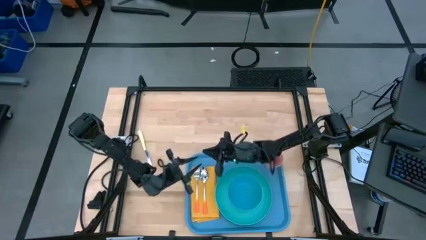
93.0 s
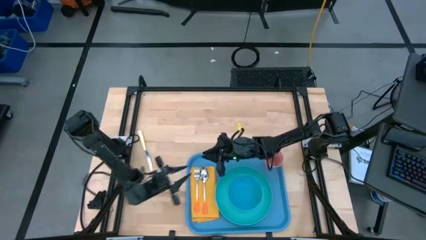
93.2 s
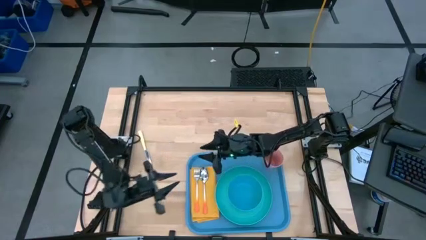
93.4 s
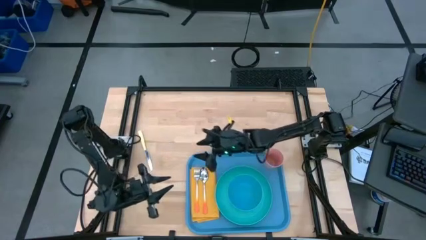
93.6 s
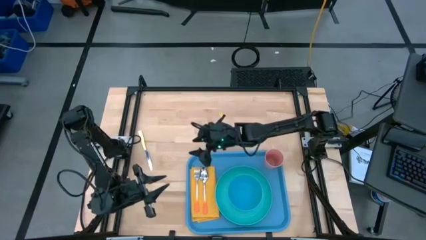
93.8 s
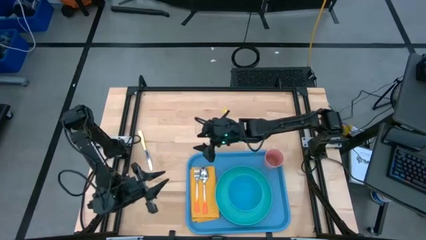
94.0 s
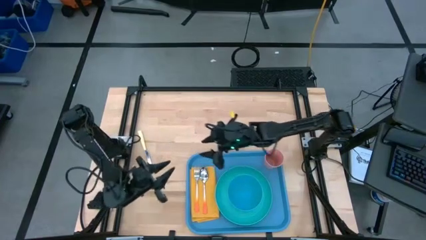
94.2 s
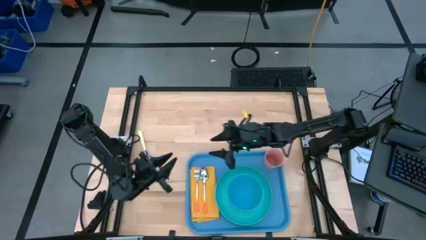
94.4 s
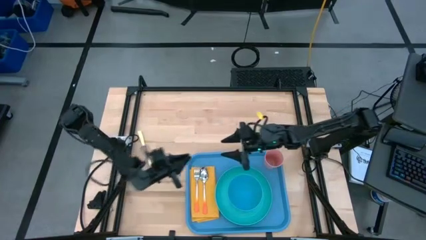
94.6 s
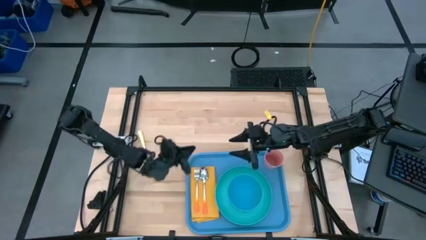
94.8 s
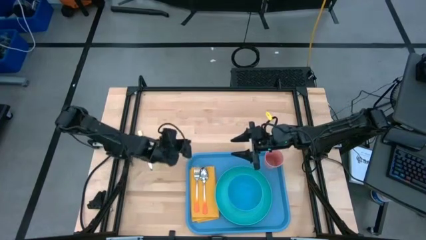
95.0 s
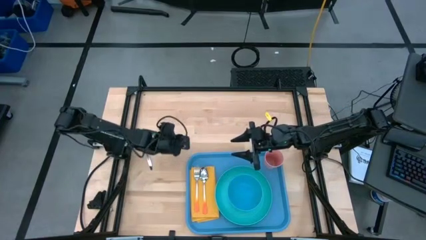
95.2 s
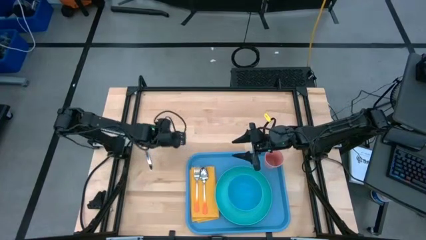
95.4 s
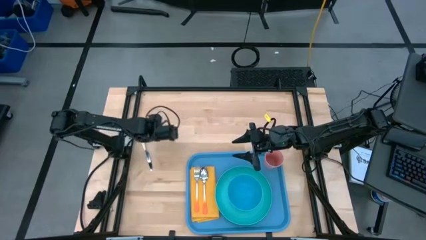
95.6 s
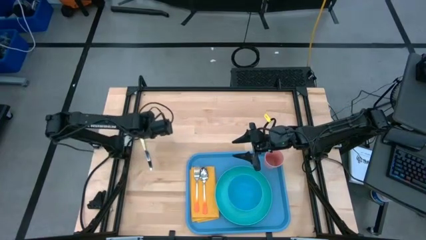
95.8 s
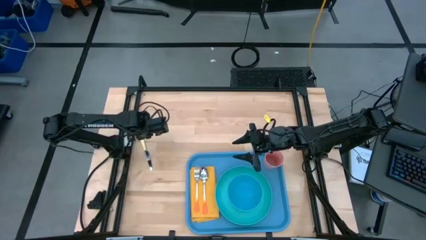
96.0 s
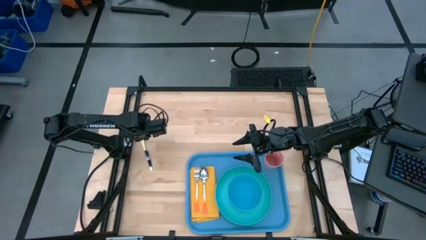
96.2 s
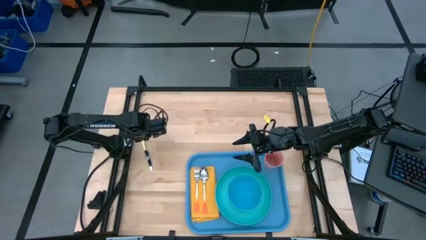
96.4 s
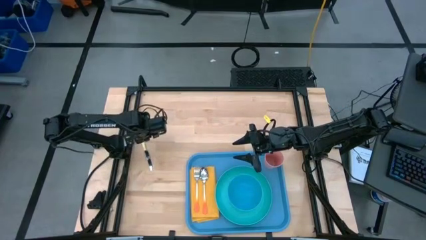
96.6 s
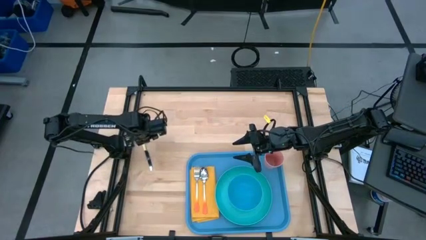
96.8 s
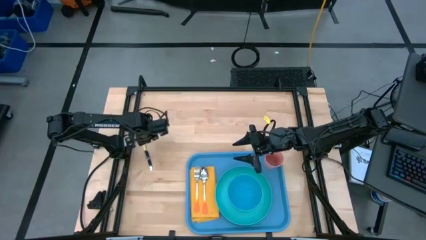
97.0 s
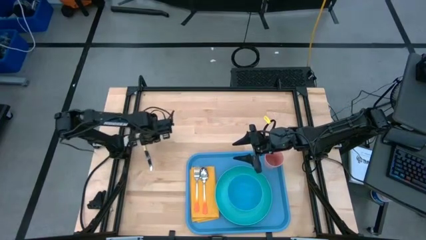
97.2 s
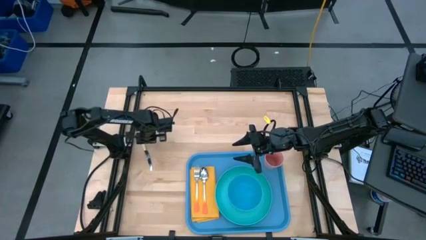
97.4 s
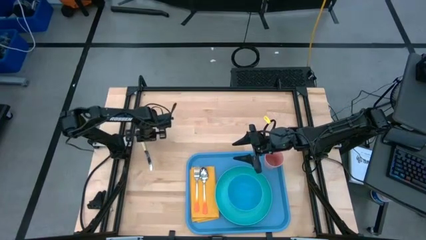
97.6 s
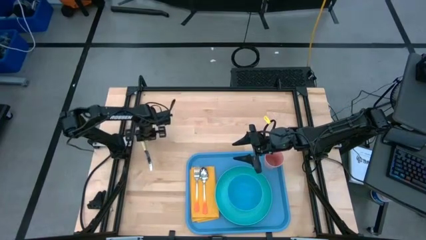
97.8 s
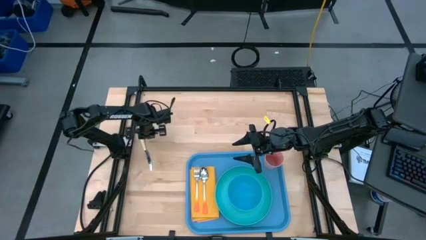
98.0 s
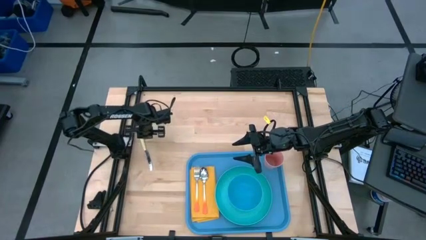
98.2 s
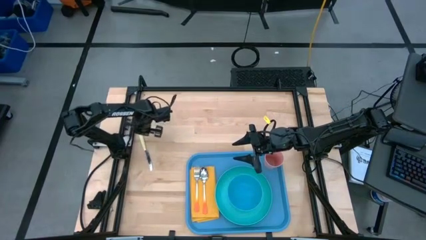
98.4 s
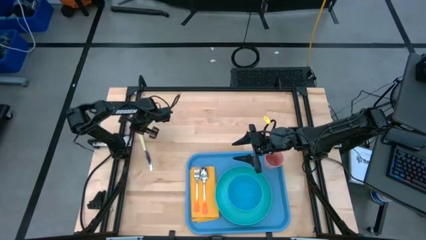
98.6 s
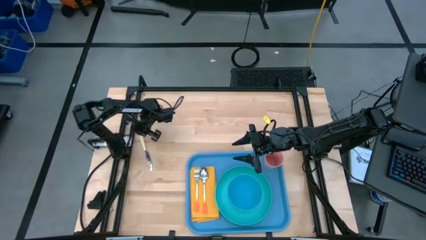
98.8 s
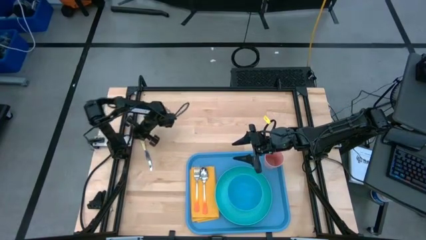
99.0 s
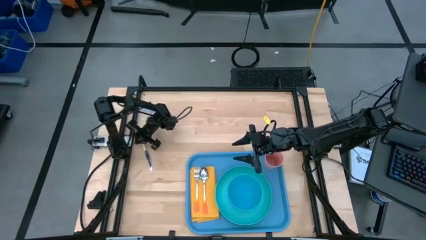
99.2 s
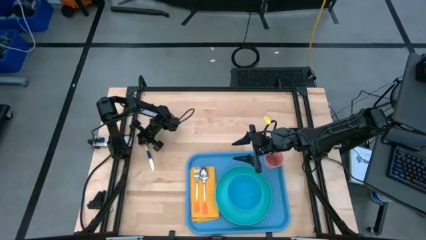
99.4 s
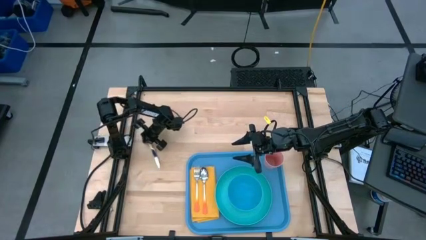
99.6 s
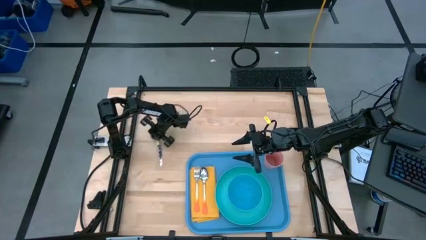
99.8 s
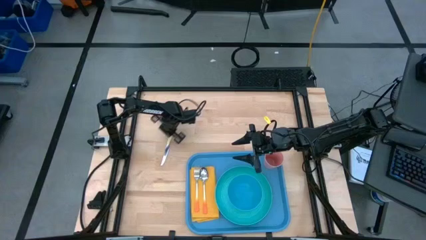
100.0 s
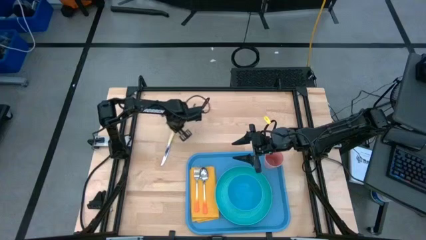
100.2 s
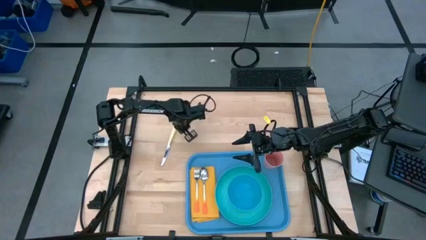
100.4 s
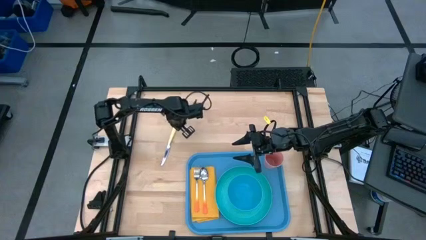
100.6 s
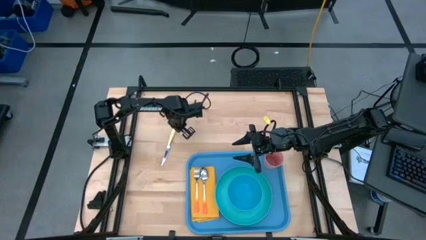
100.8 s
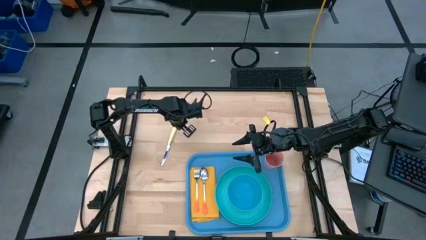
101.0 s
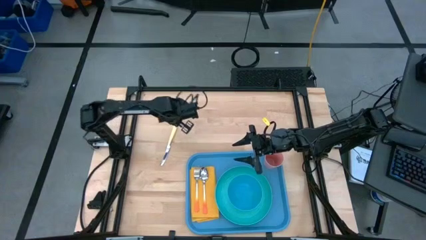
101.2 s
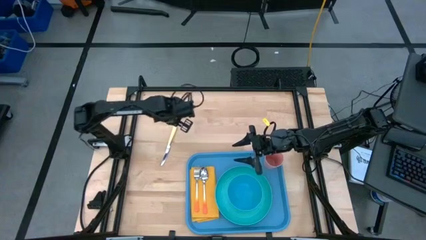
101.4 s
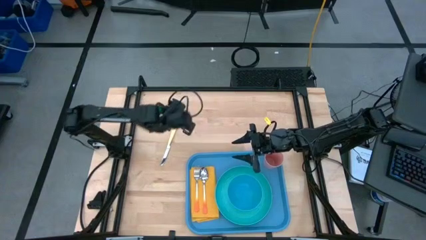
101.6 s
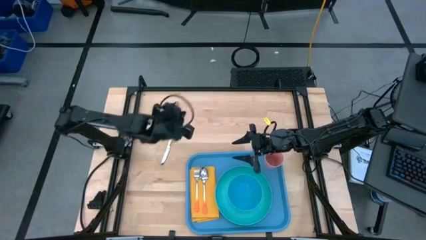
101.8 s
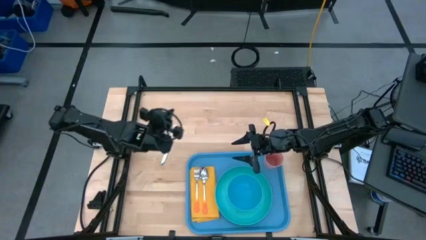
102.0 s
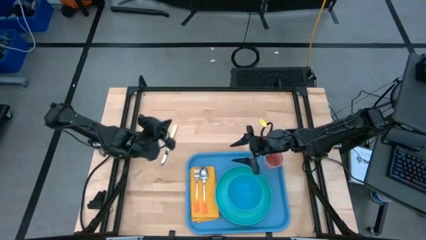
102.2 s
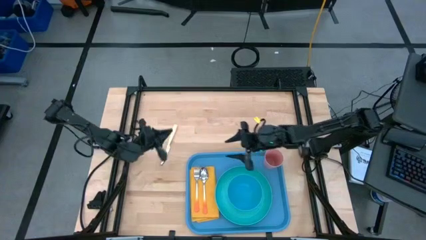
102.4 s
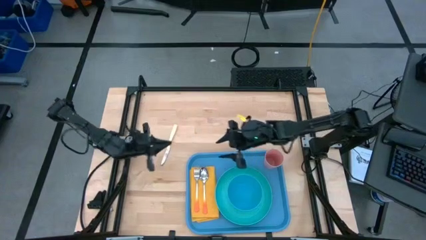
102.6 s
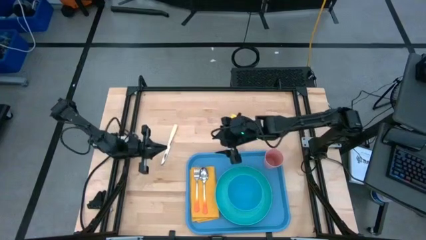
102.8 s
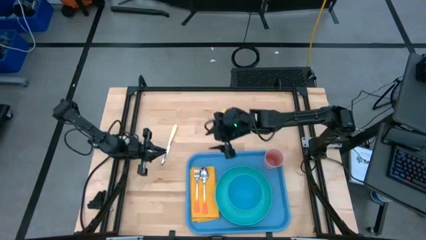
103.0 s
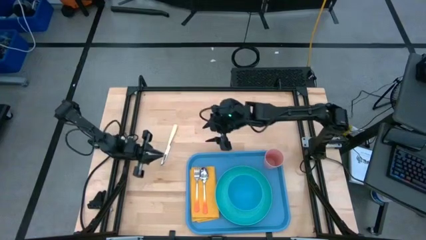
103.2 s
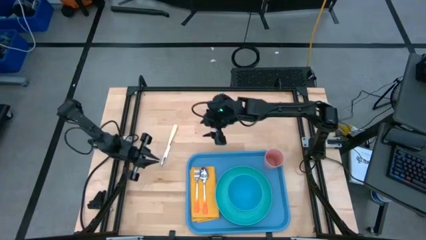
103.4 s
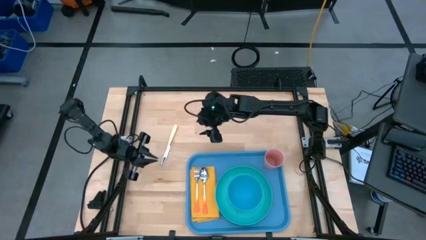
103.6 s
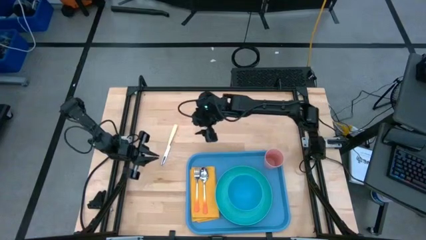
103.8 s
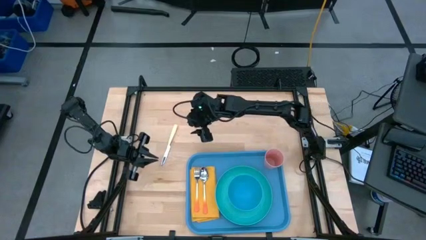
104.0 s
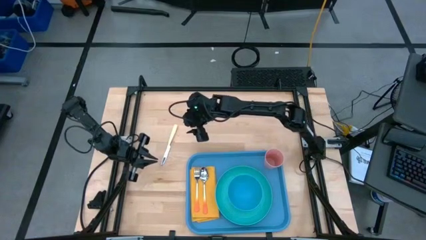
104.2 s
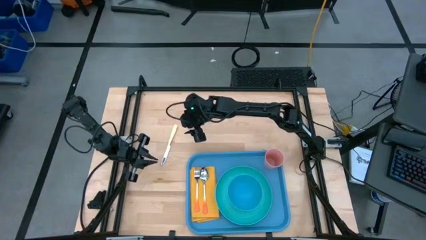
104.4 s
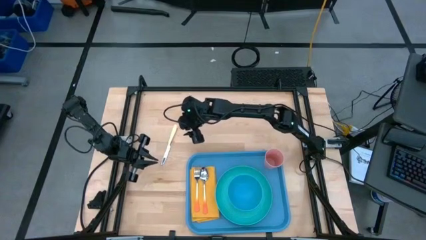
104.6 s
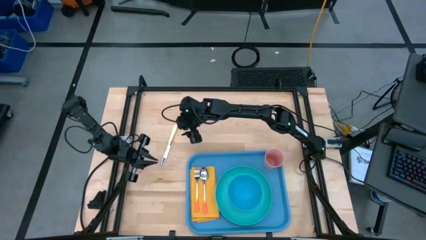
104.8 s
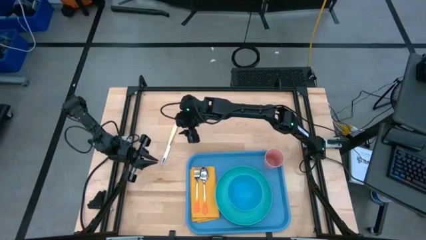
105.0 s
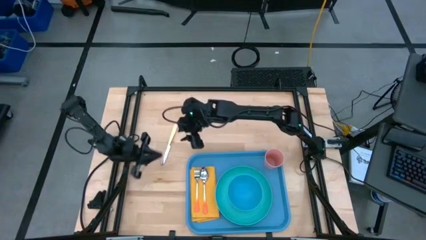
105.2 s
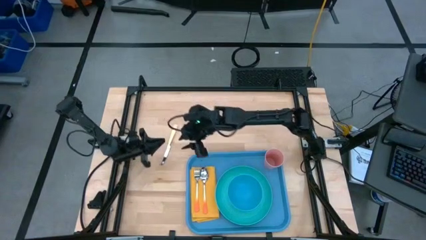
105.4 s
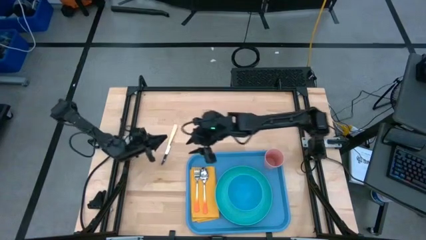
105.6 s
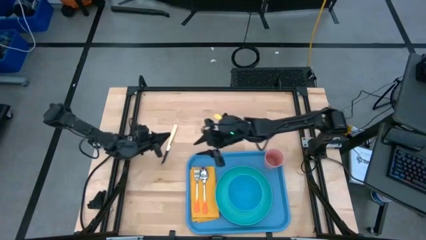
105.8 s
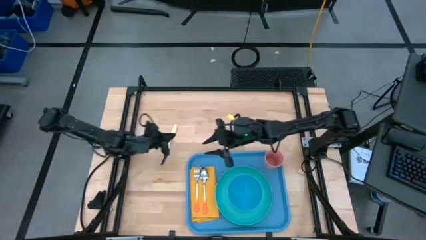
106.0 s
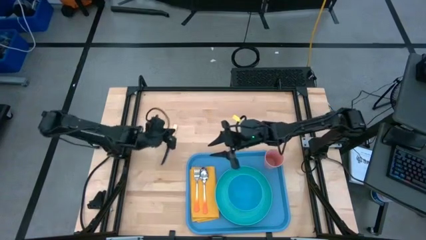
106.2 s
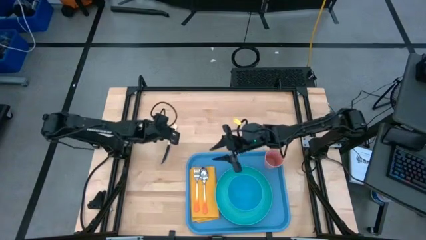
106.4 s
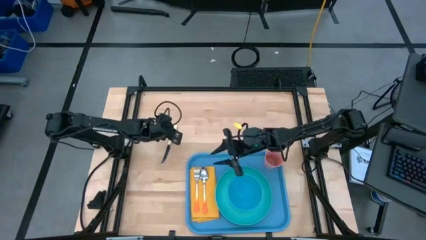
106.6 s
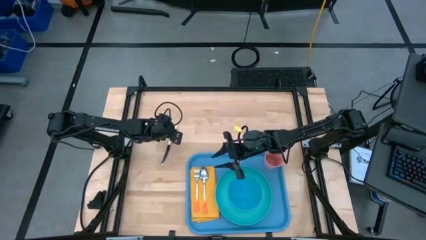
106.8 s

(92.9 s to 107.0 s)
Task: Set up tray
Put the yellow table knife on the orange table napkin to the right of the orange spoon

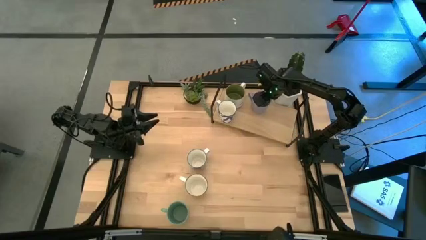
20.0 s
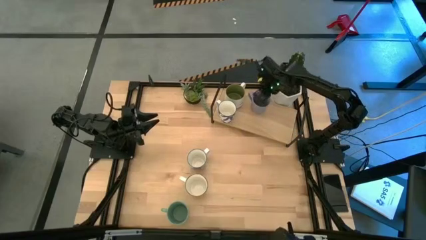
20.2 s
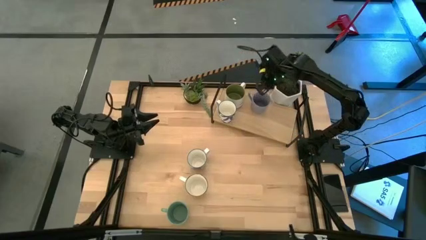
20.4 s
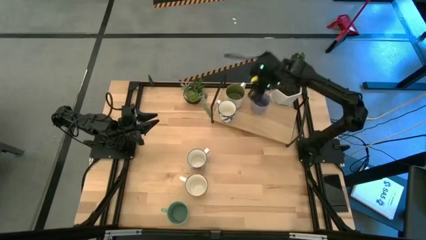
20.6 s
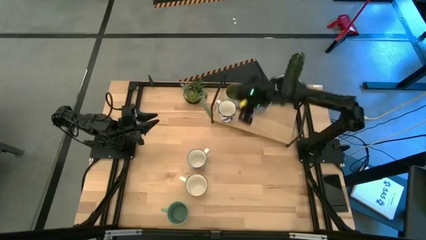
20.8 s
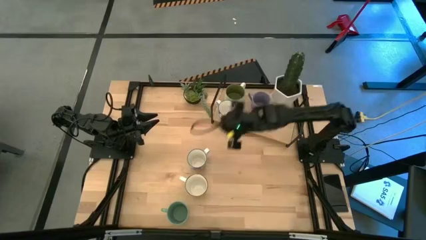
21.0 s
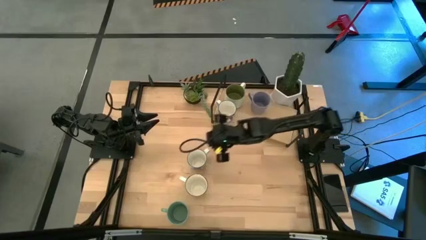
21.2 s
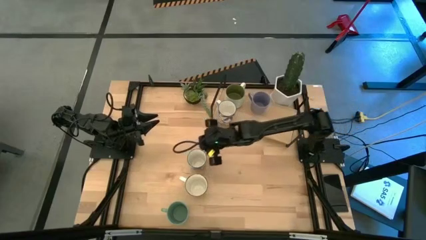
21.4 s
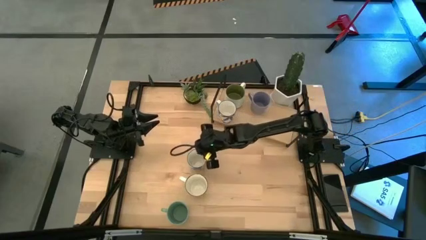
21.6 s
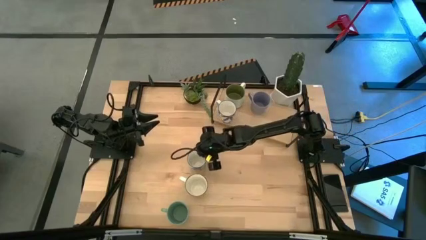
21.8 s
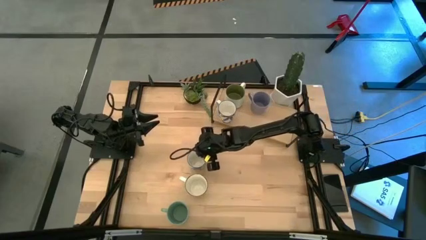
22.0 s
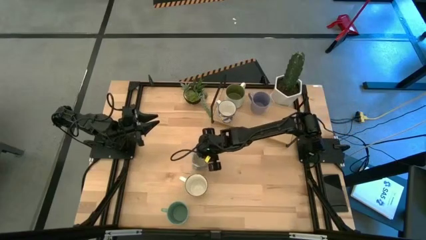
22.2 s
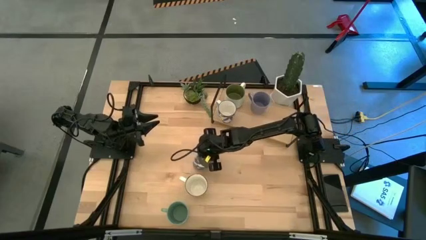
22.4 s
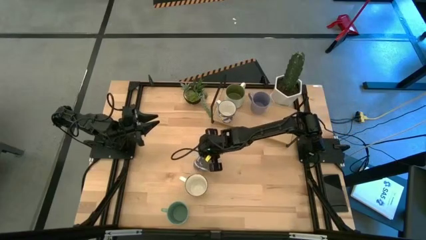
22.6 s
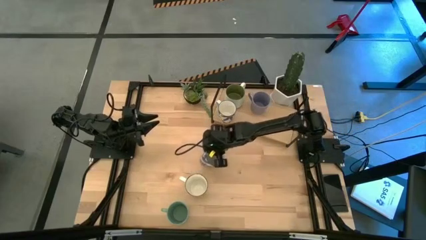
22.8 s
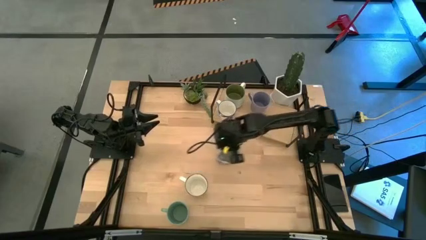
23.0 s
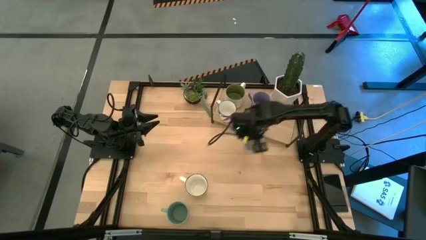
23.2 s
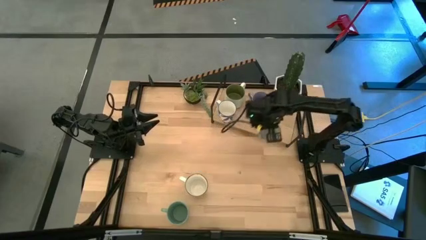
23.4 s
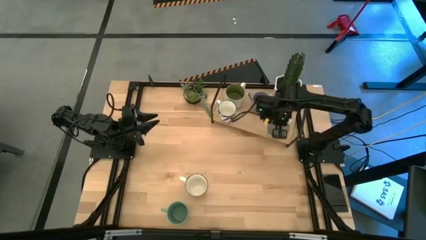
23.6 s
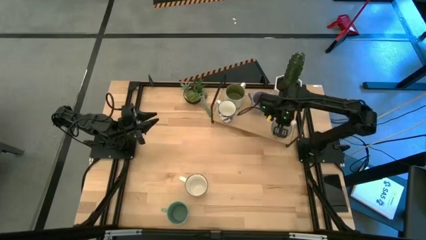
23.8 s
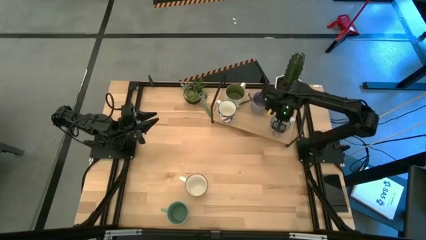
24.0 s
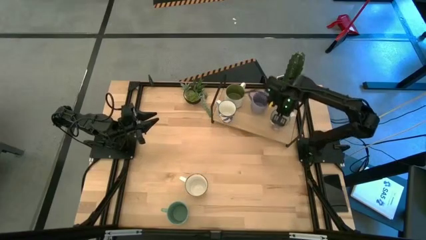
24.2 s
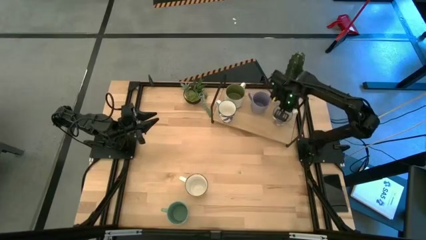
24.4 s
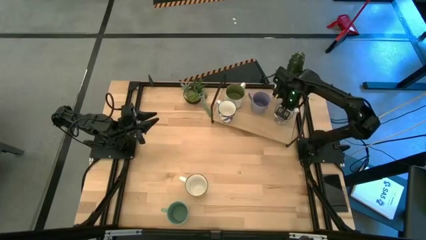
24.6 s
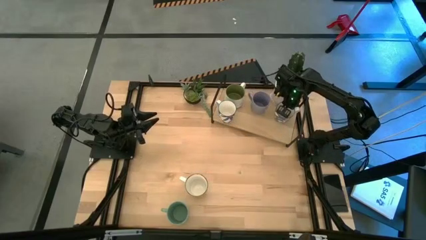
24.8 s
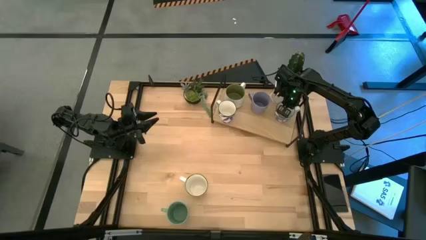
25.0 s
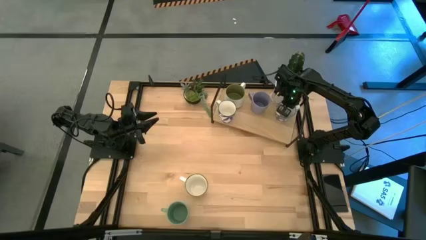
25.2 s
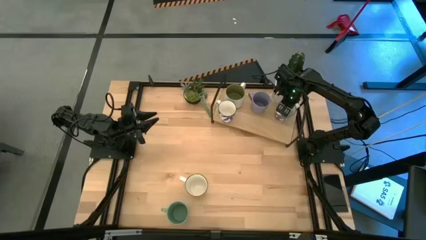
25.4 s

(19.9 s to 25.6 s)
Task: Place coffee mugs
Put the blue patterned mug on the shelf
